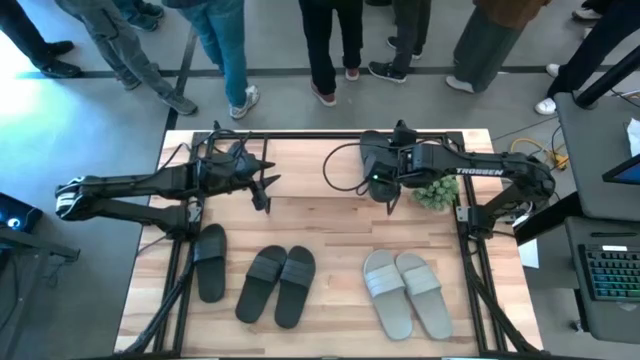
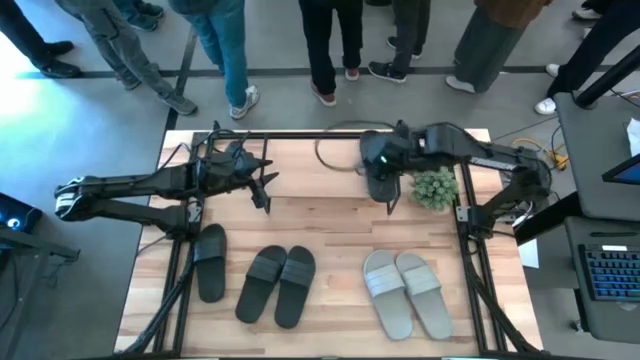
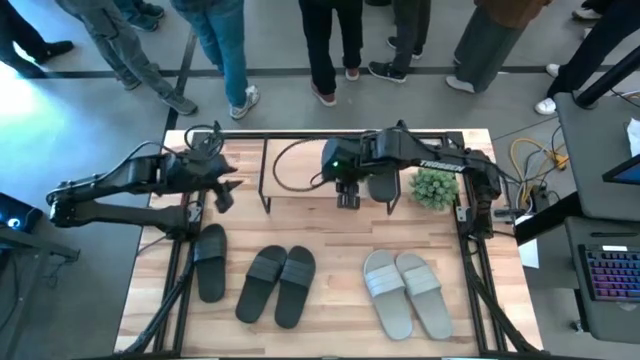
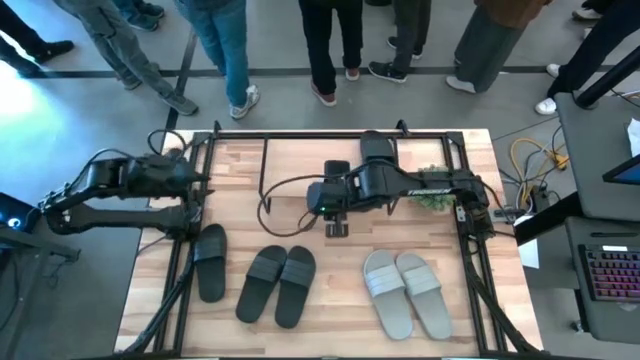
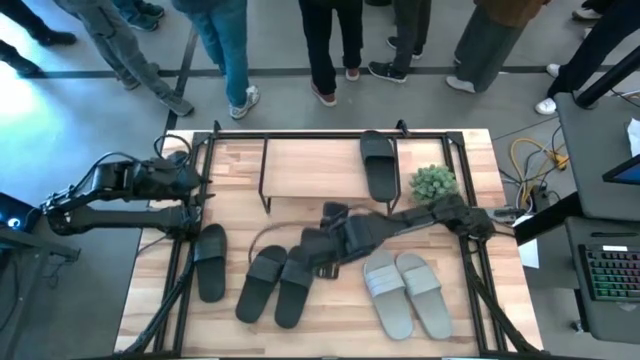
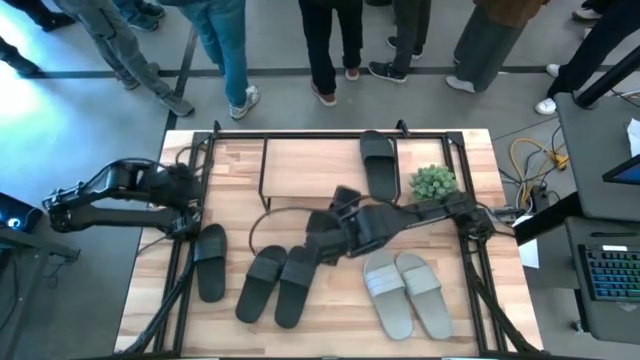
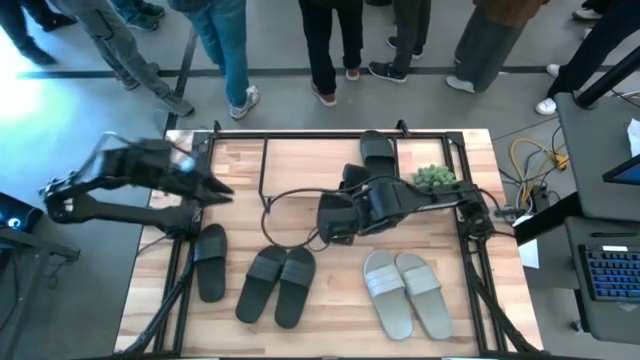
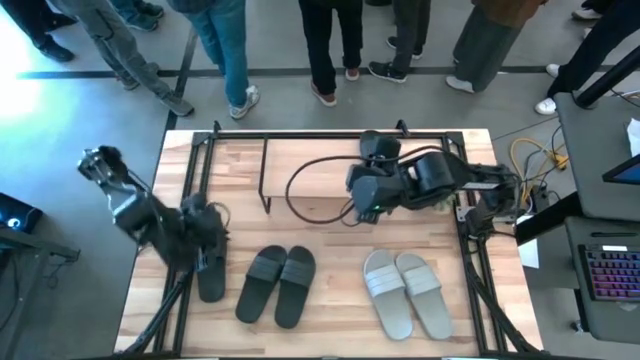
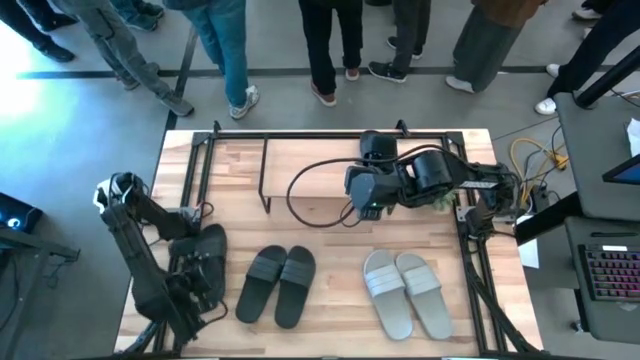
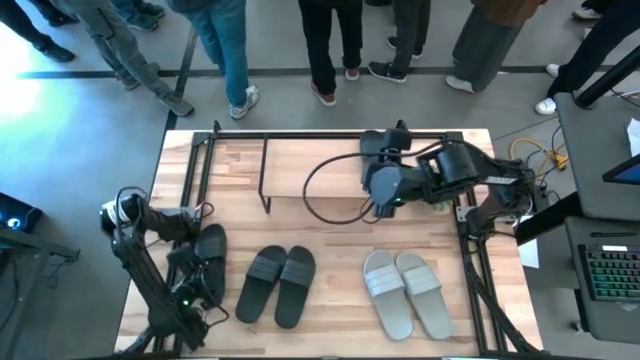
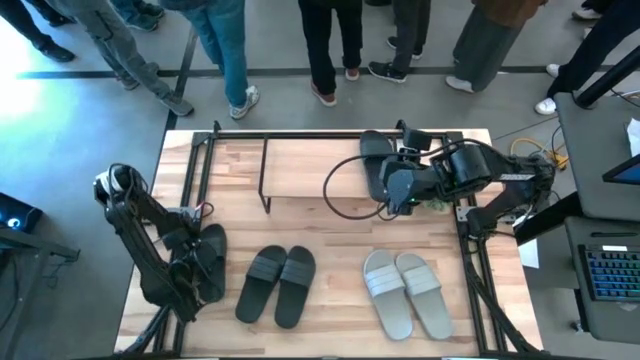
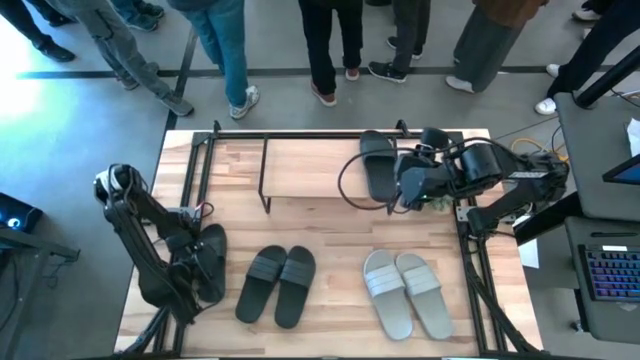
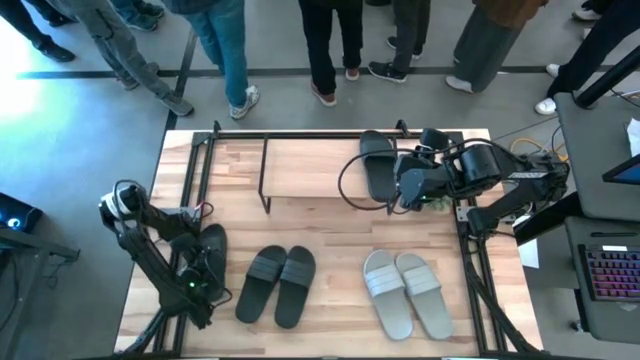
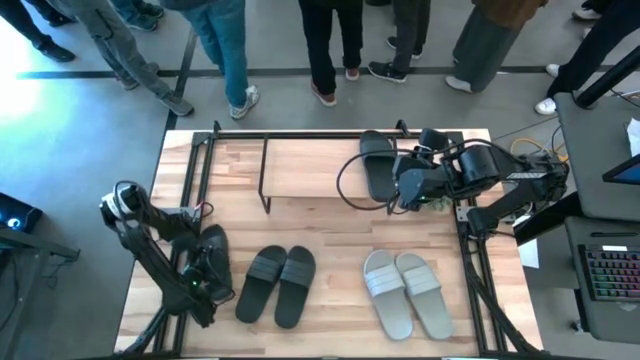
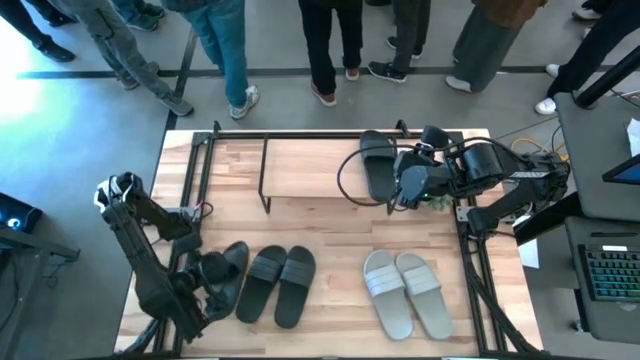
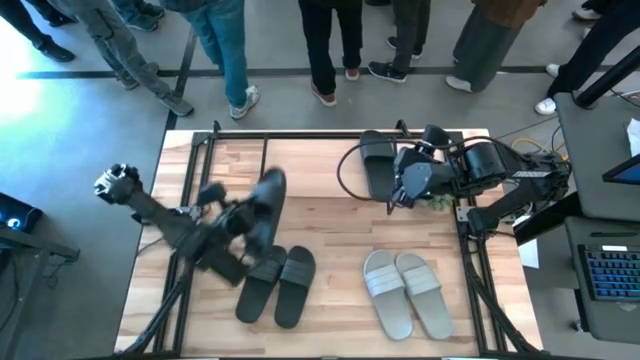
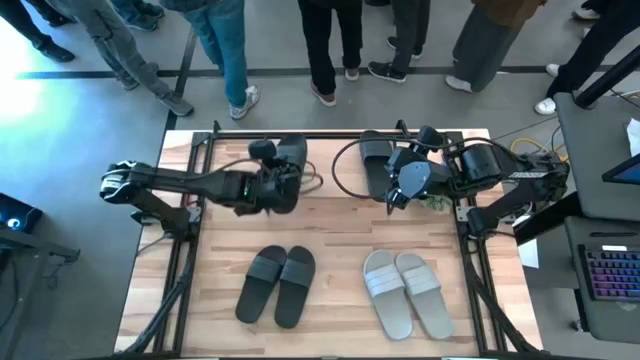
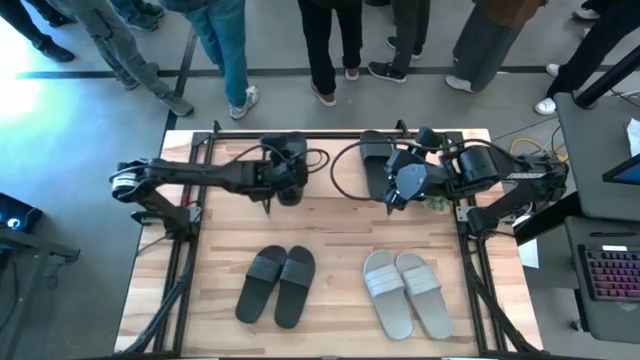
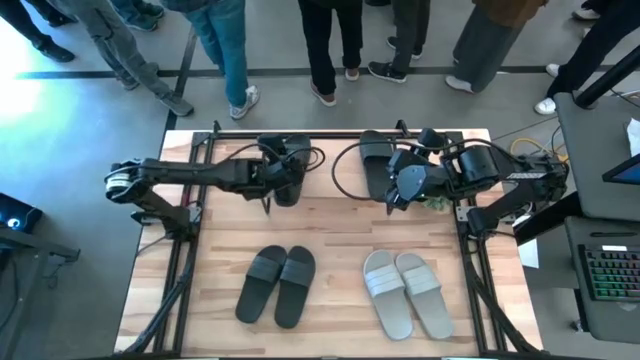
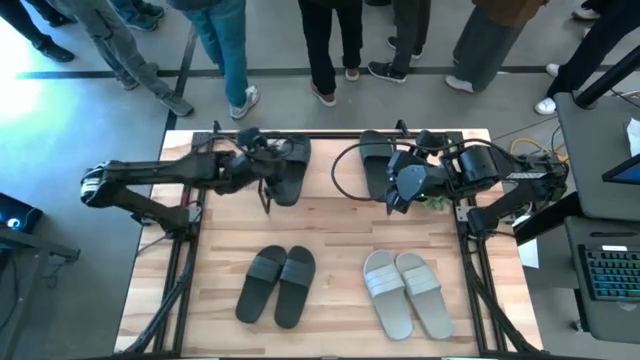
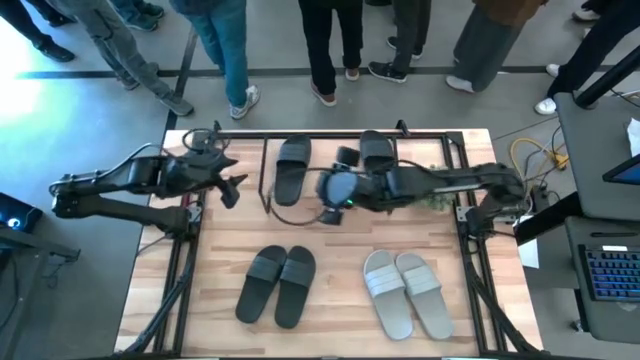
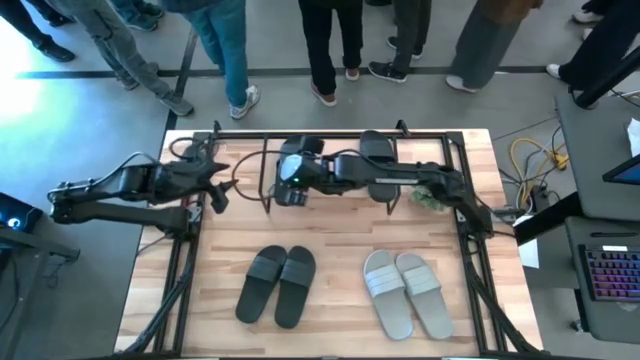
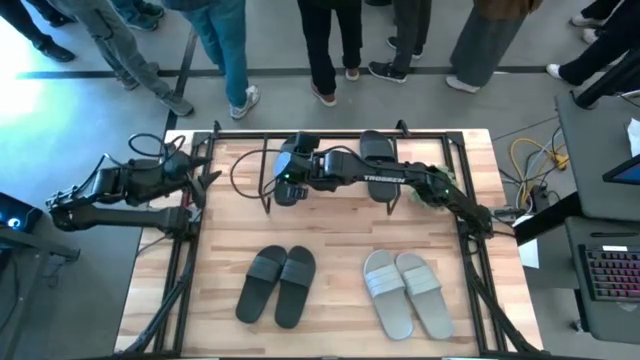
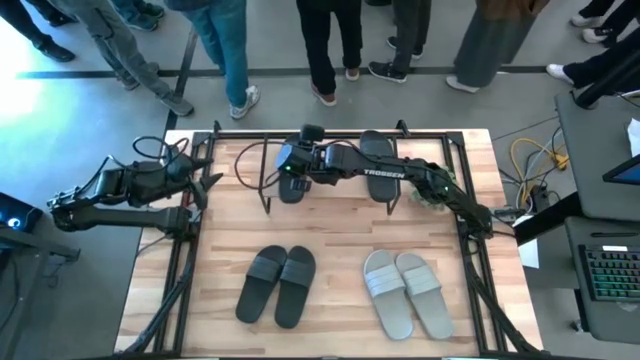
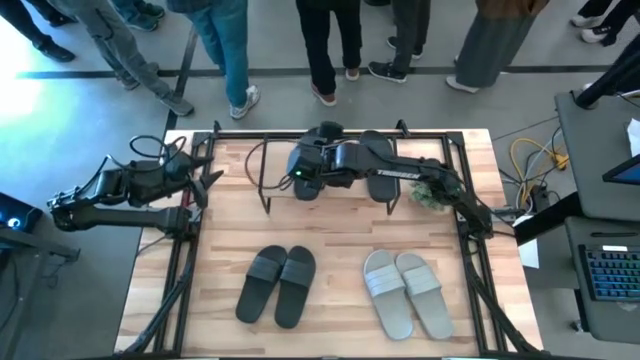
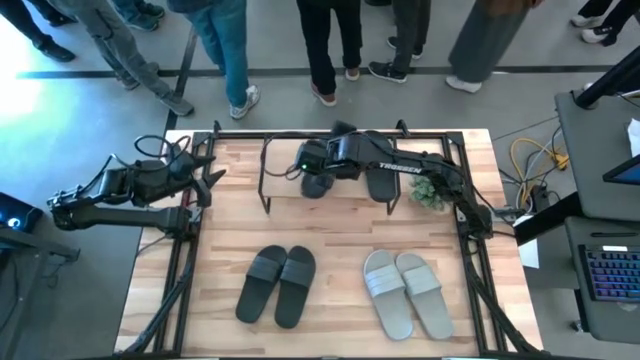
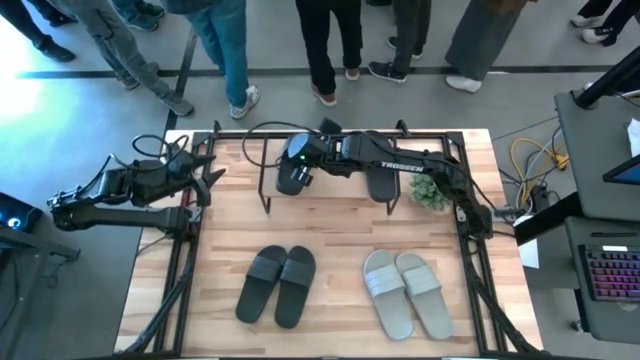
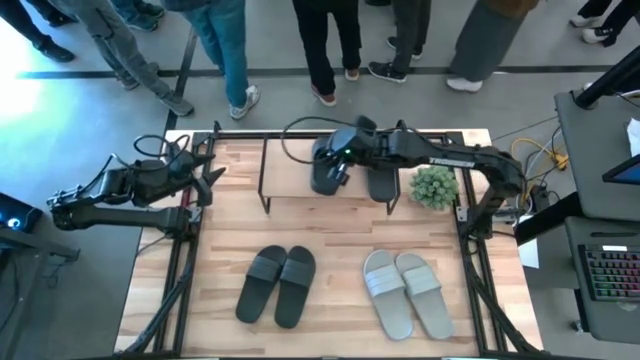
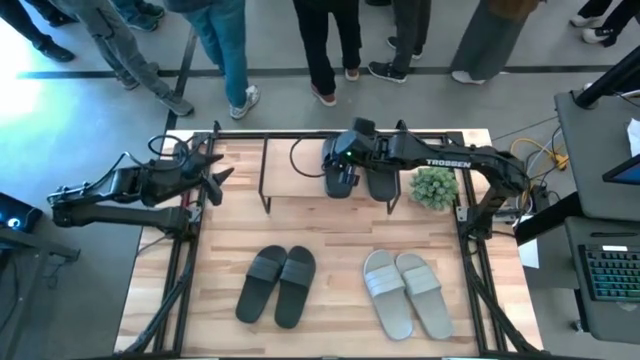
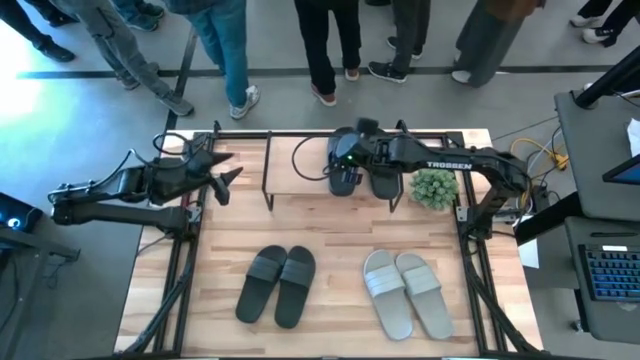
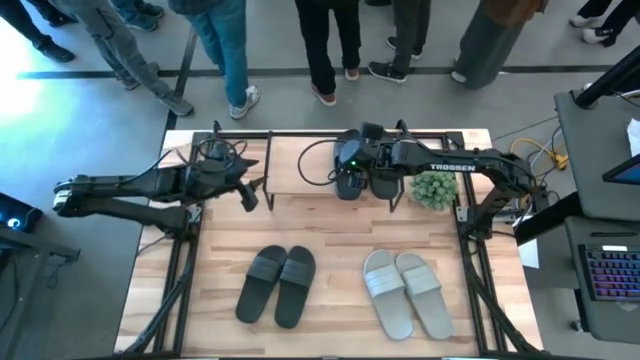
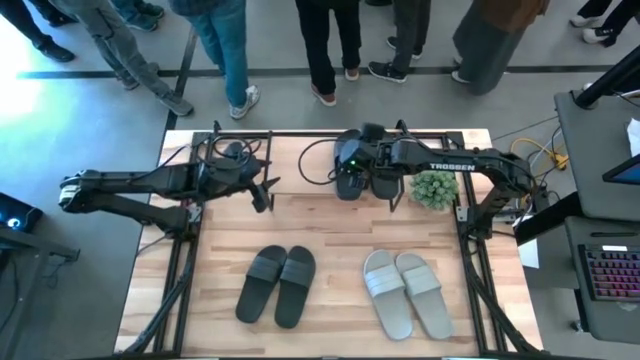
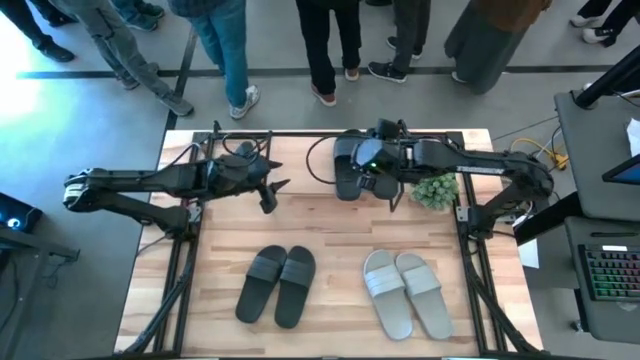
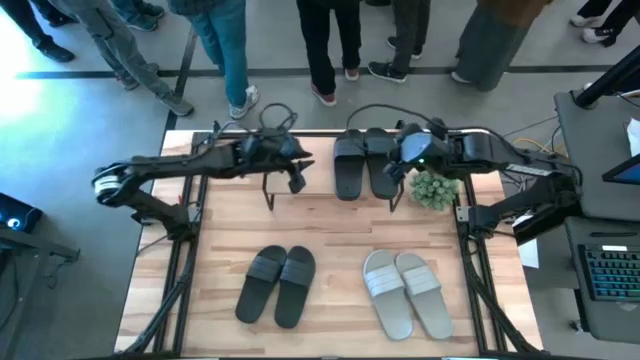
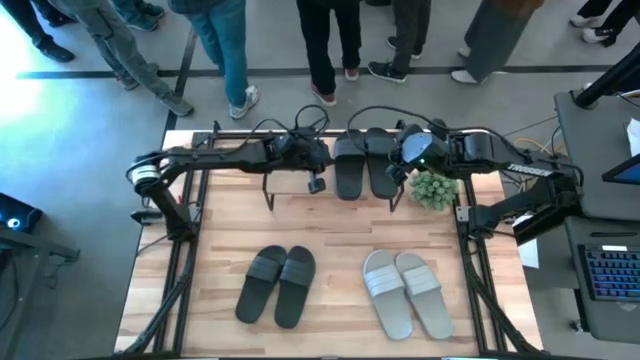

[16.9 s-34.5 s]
Task: Pick and place slides into the shelf
Put the black slide on the shelf

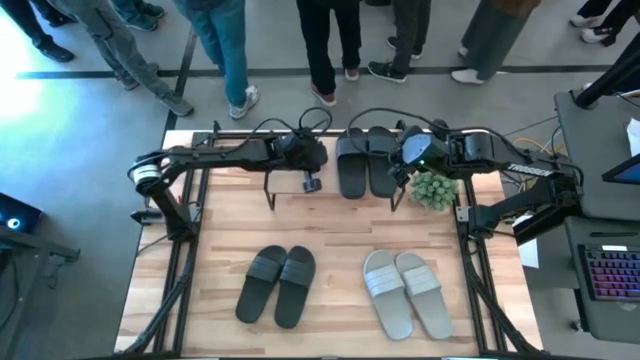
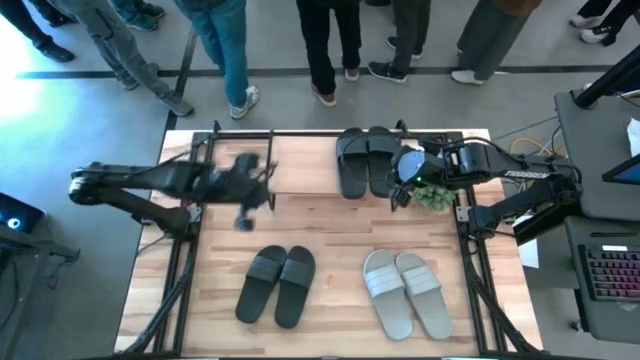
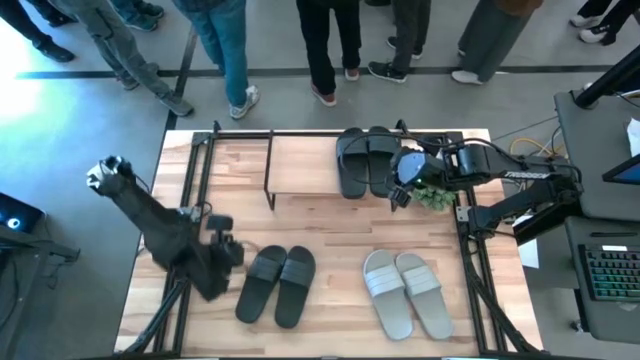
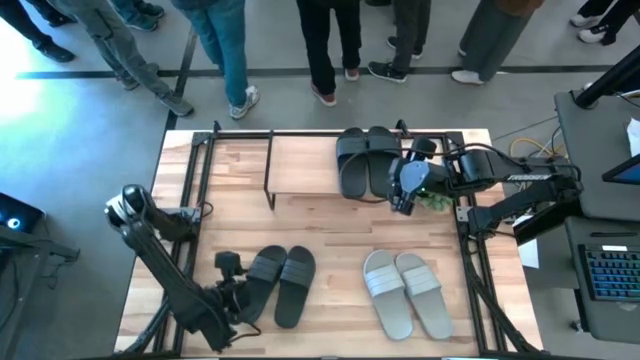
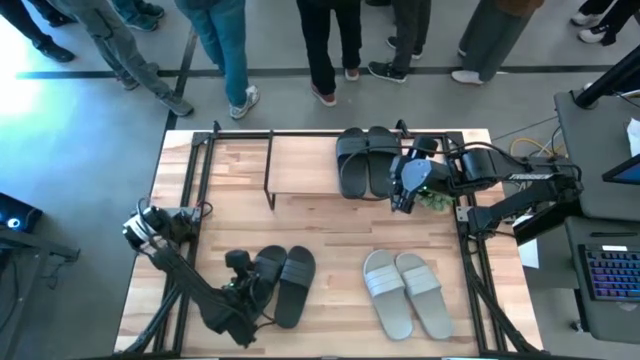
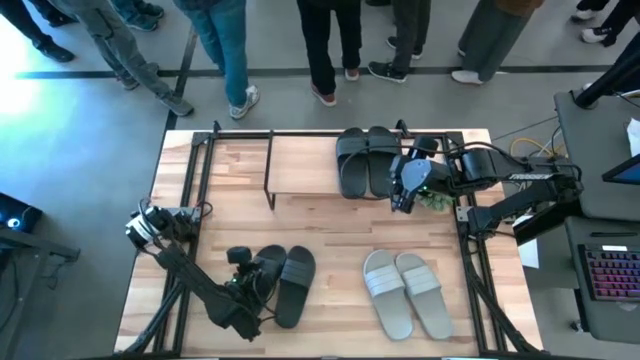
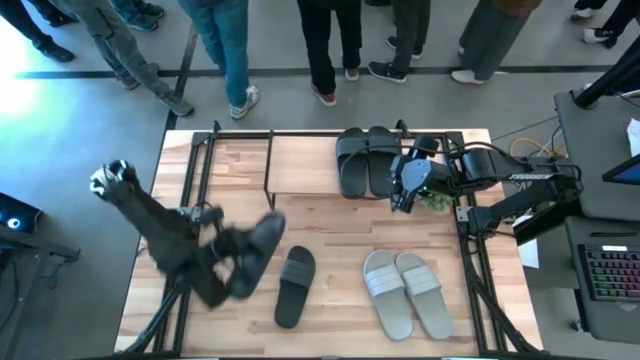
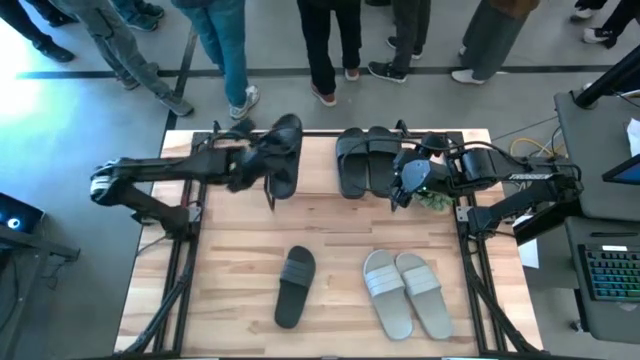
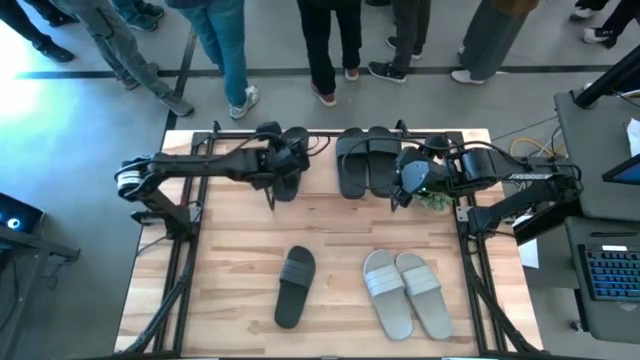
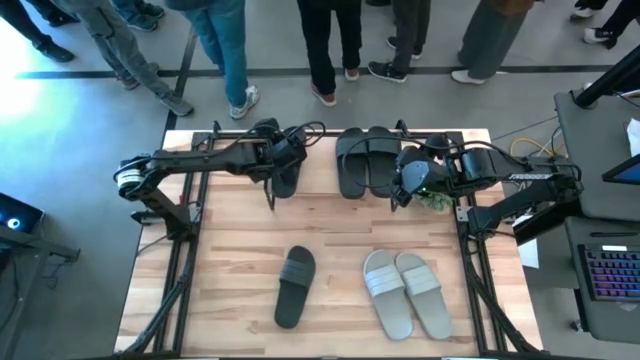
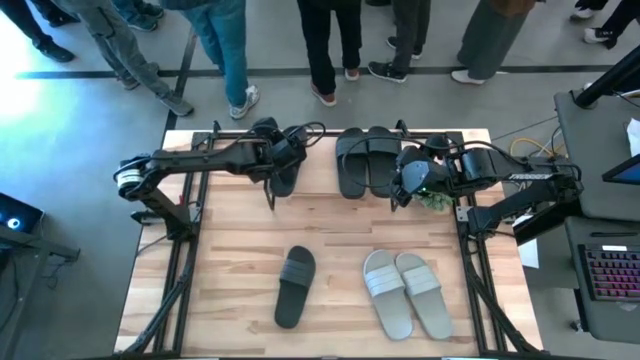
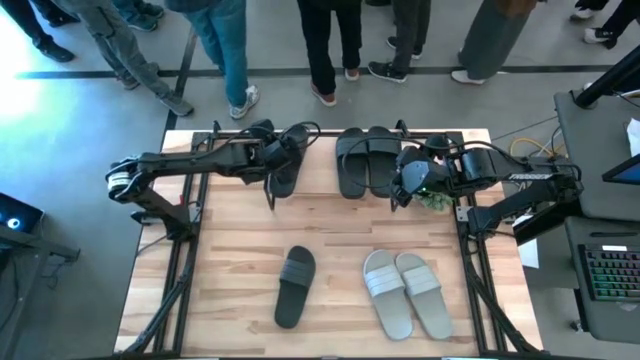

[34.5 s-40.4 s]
Put the black slide on the shelf
